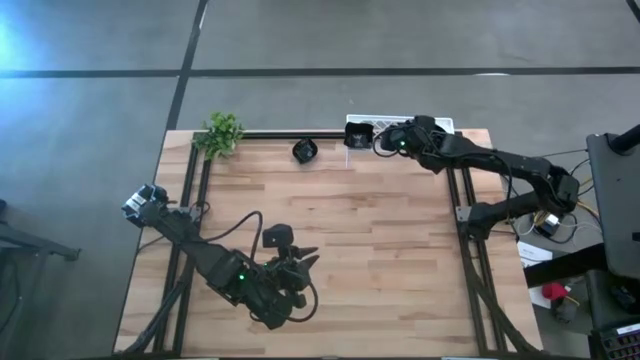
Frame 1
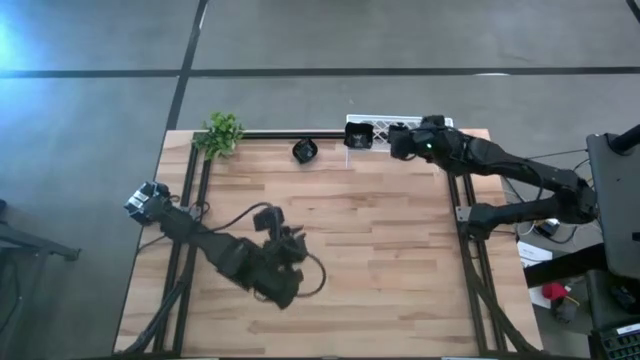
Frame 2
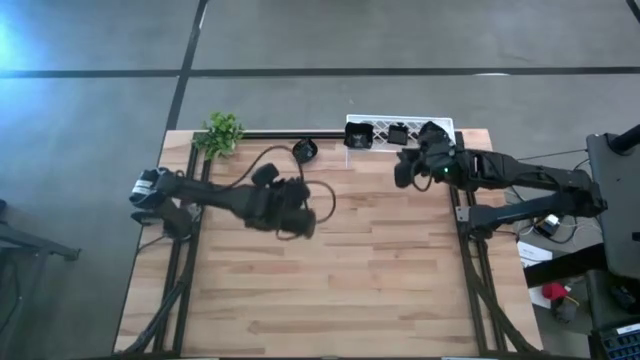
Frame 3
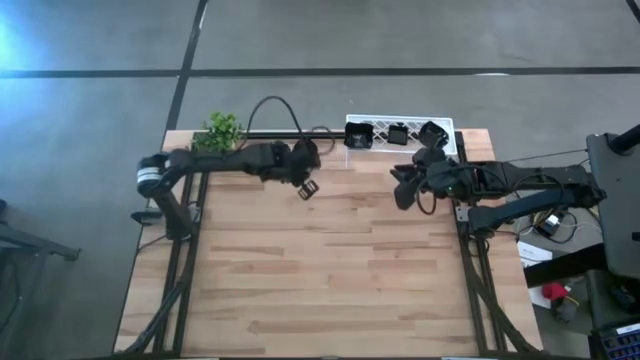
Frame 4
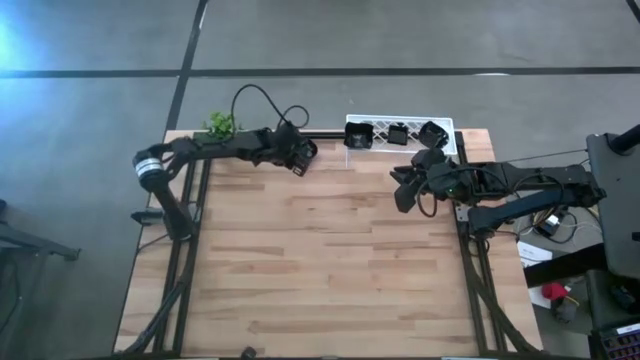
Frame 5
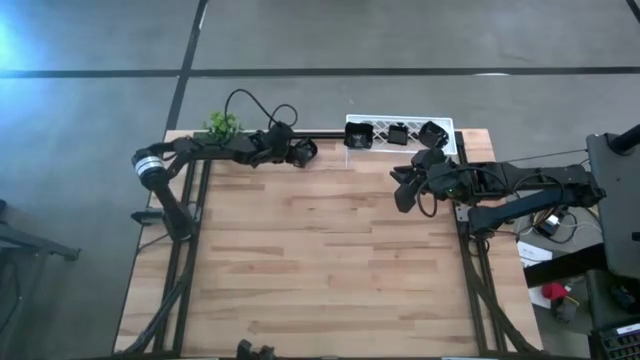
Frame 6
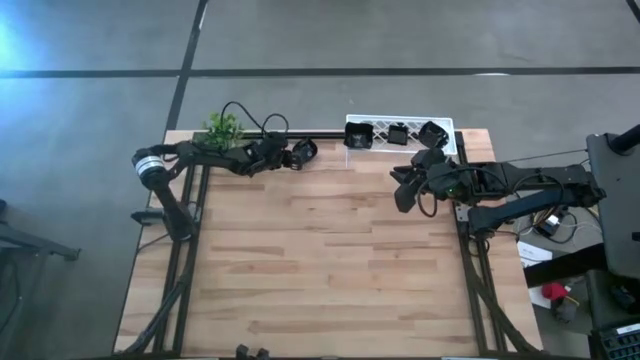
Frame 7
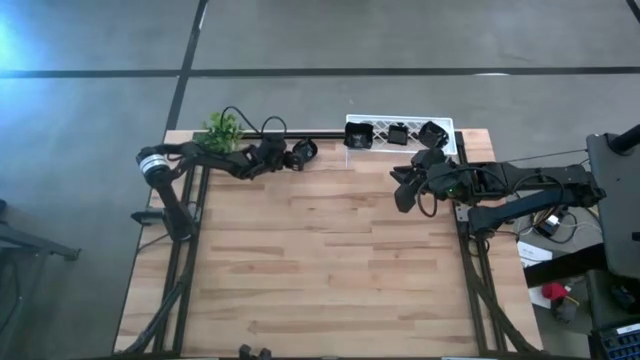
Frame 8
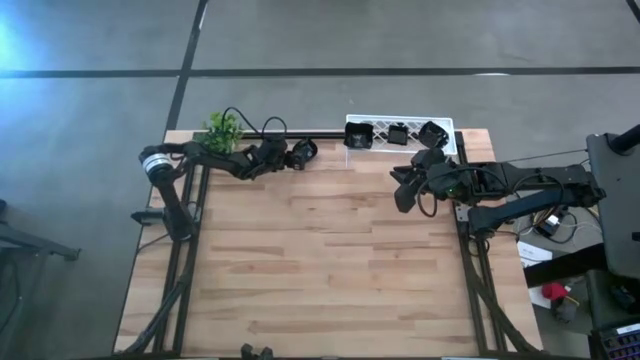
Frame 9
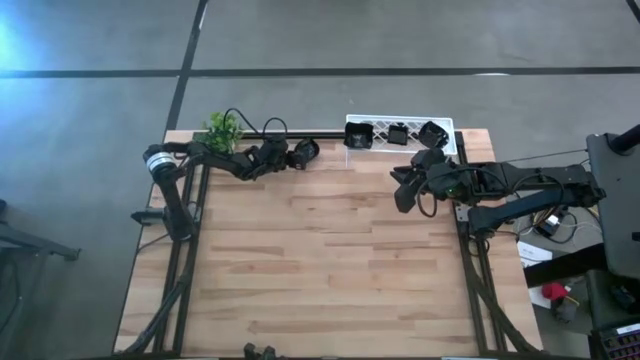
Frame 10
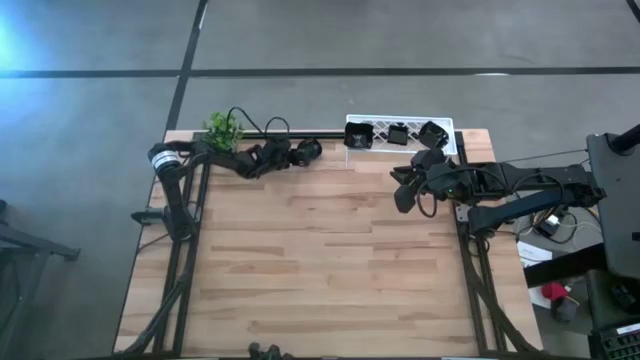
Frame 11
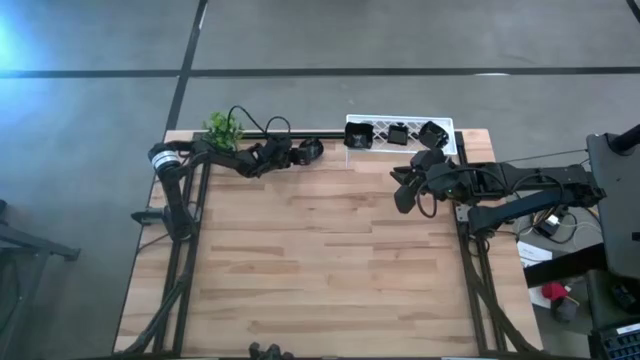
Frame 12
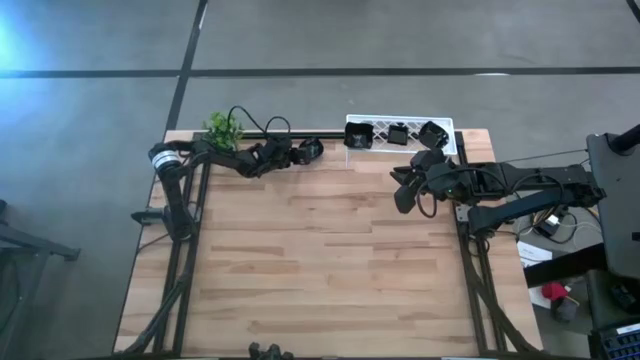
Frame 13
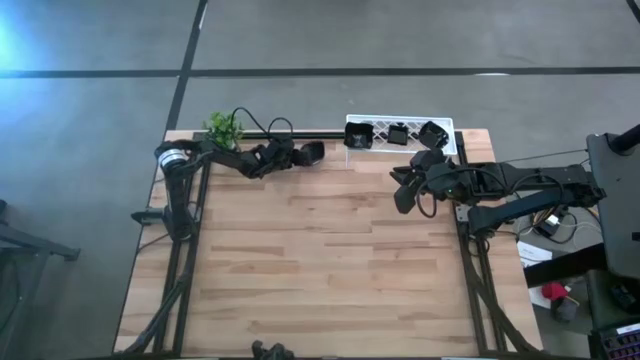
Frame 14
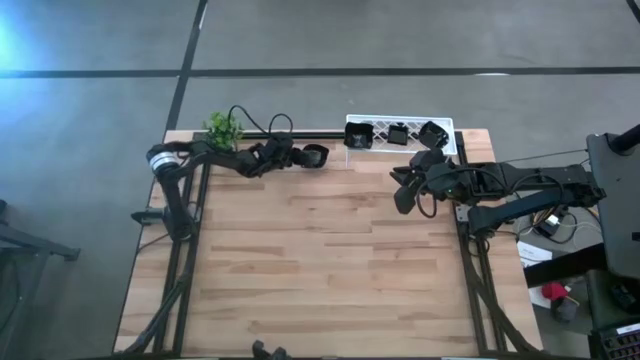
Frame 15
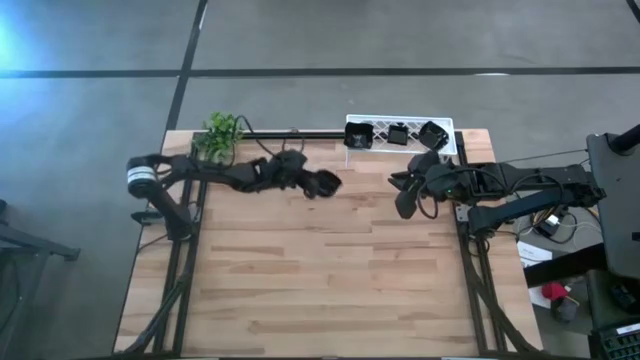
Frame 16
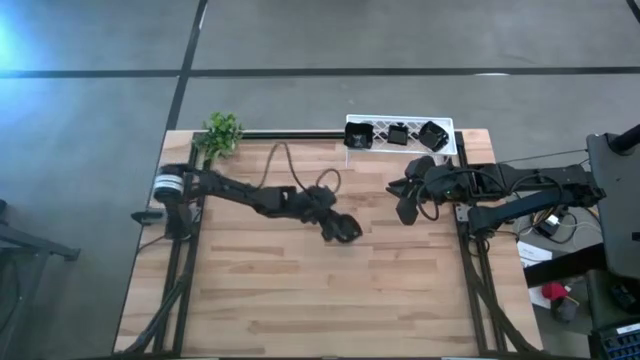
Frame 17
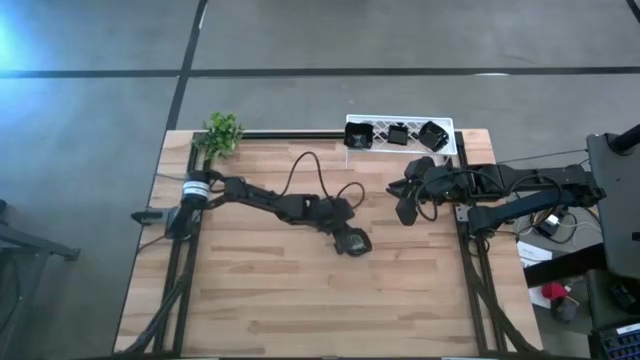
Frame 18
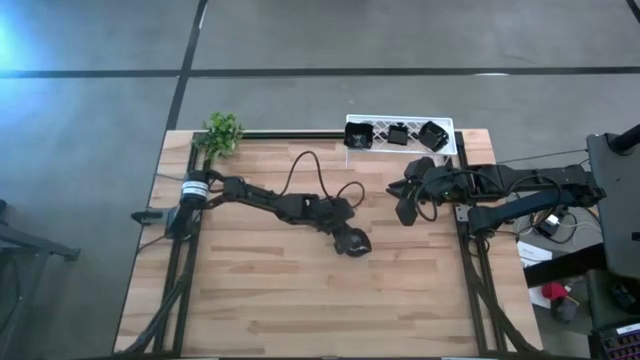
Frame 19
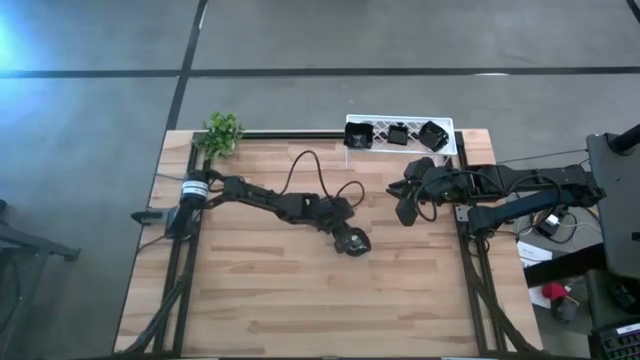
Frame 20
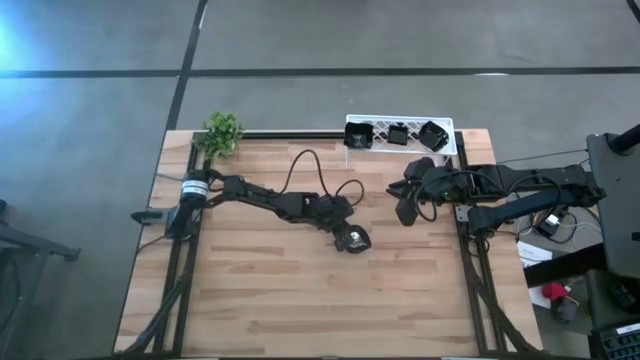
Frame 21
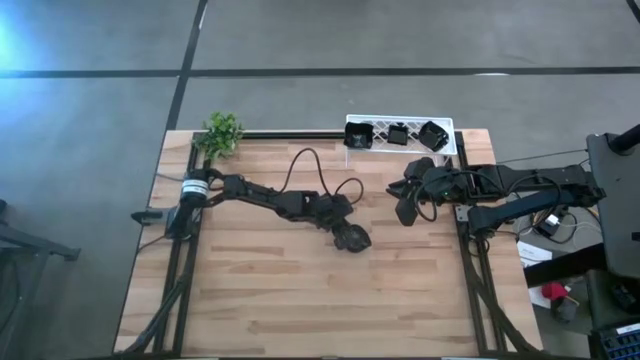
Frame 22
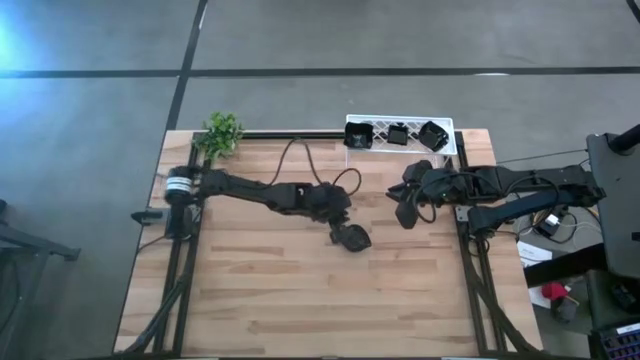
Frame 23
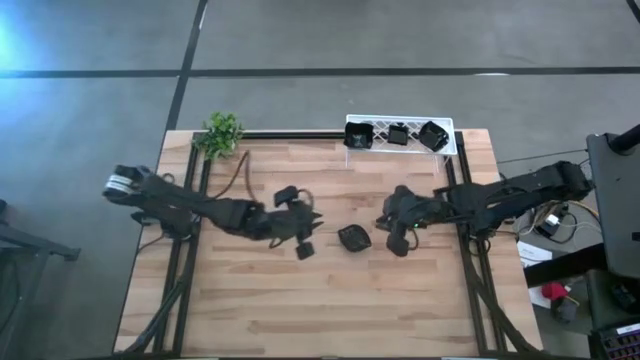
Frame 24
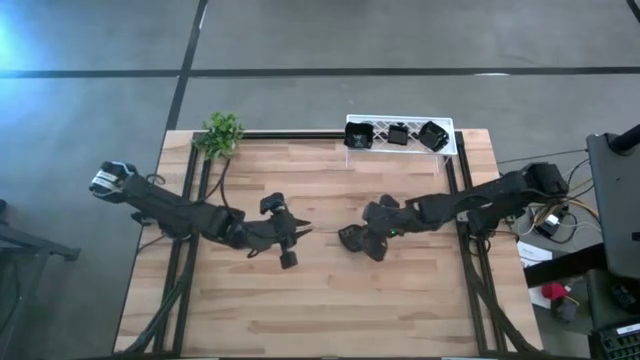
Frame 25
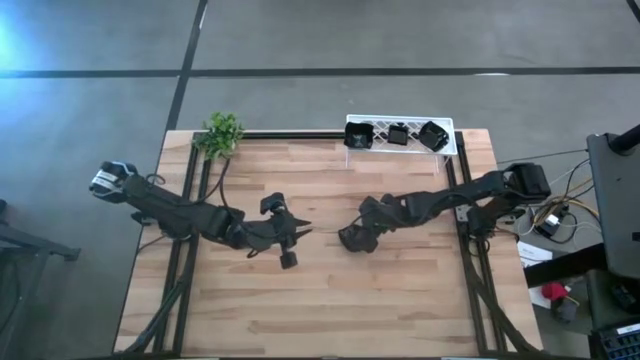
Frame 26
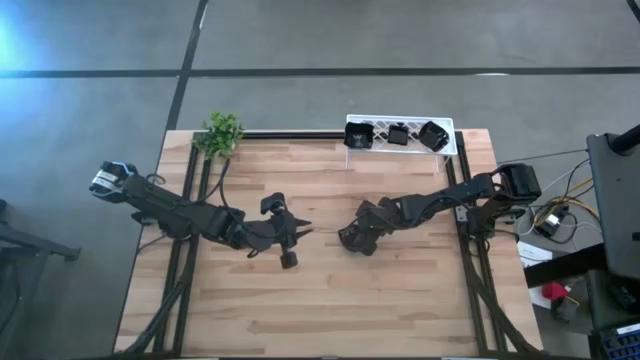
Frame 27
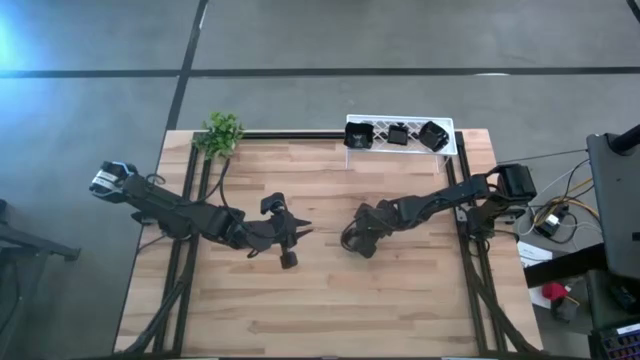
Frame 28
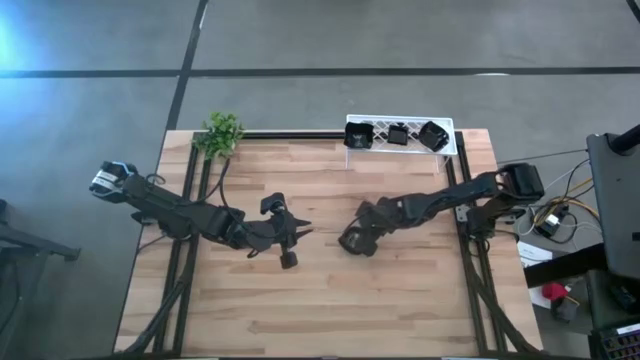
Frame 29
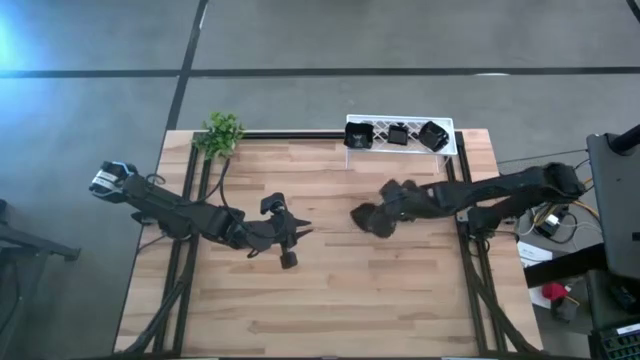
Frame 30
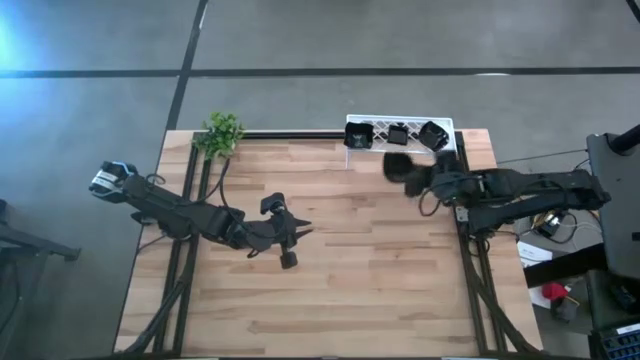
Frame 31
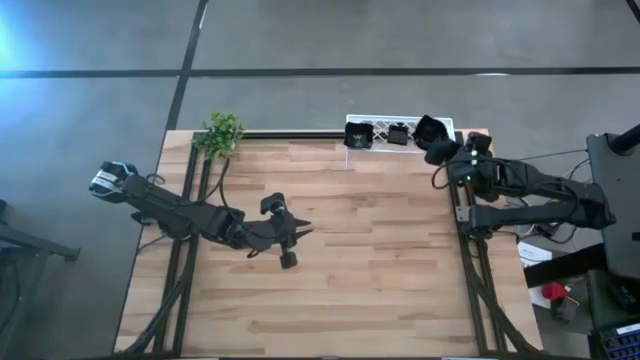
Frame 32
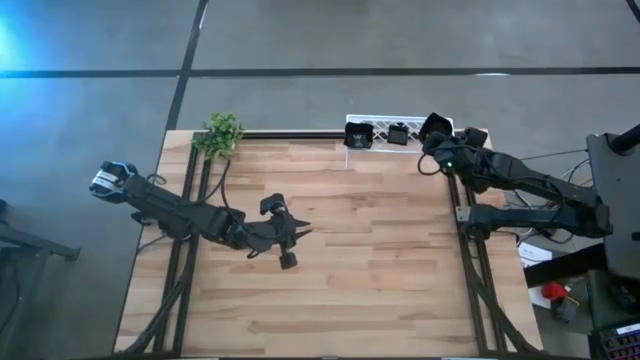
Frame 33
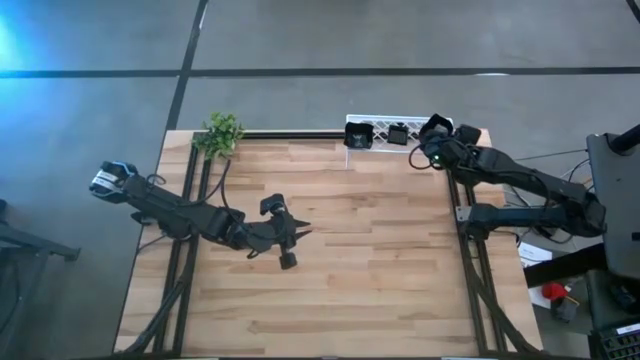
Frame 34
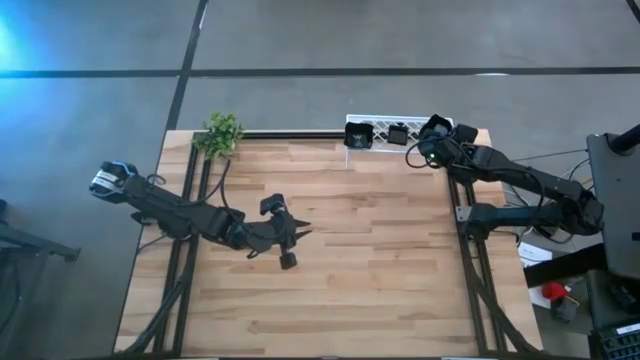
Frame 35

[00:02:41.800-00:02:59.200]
Task: Pick & Place Mini shaped plates
Stack the black leaf-shaped plate on top of the black leaf-shaped plate on the shelf

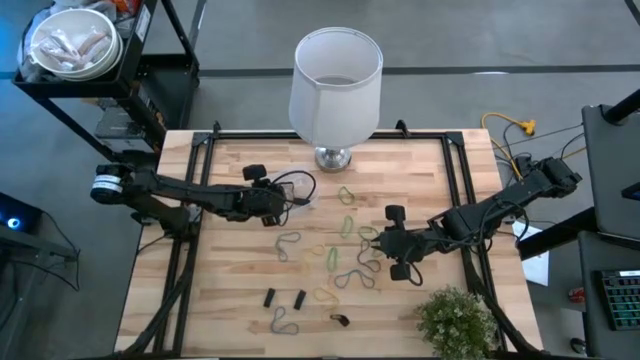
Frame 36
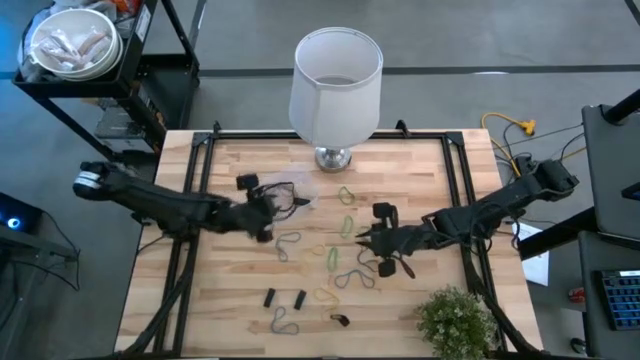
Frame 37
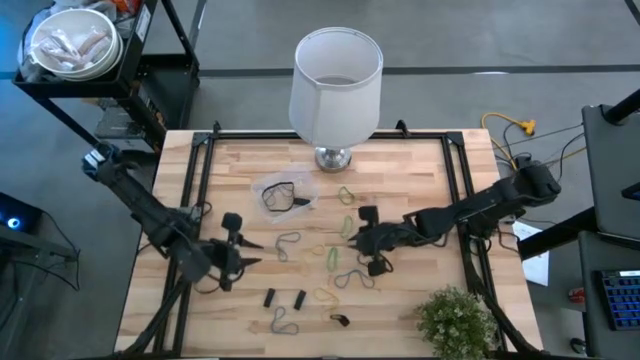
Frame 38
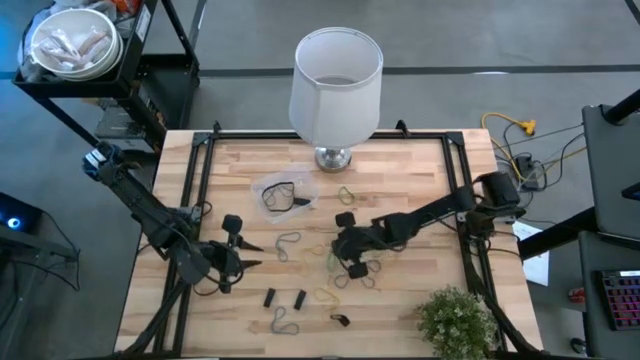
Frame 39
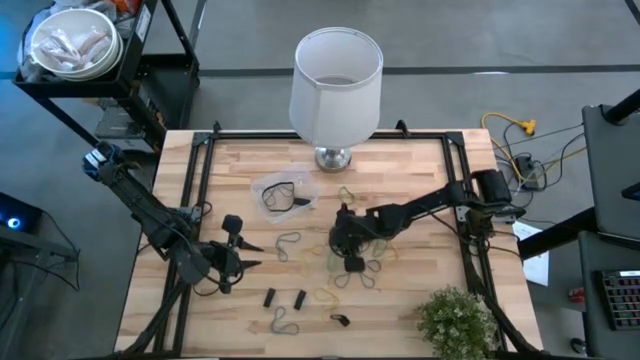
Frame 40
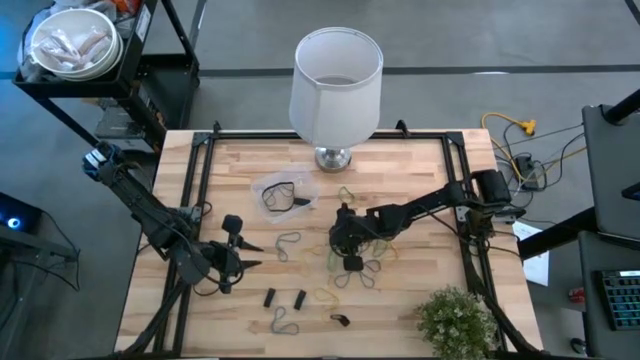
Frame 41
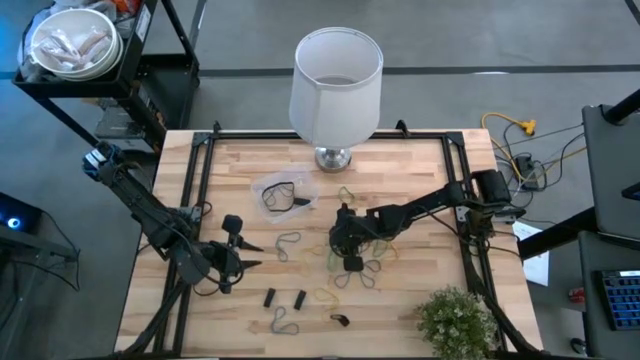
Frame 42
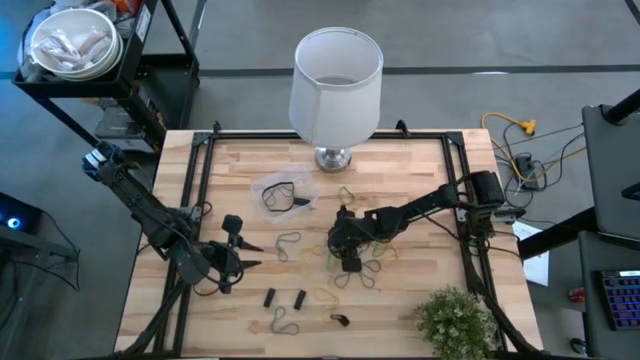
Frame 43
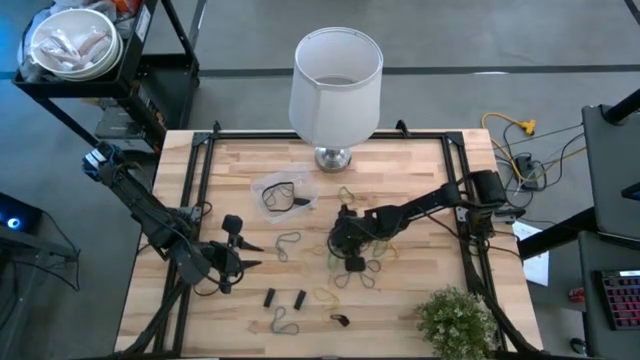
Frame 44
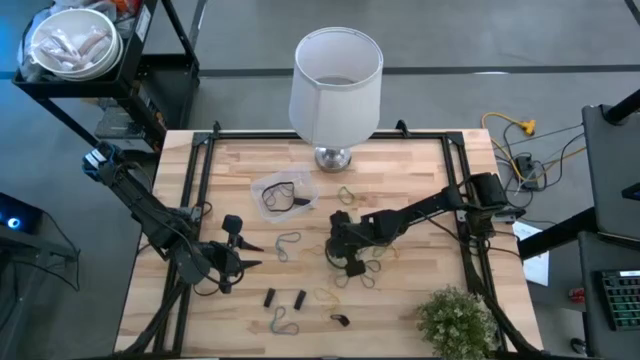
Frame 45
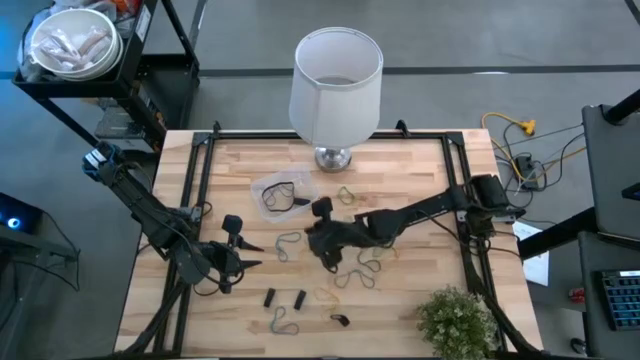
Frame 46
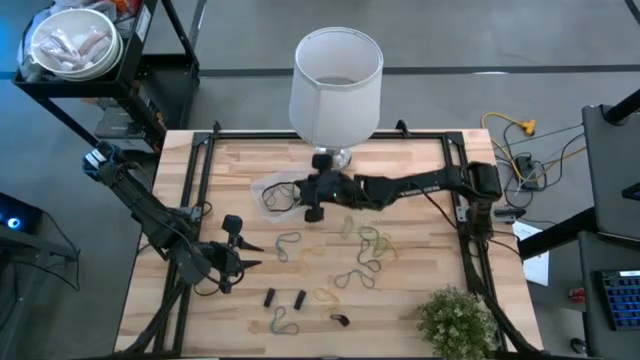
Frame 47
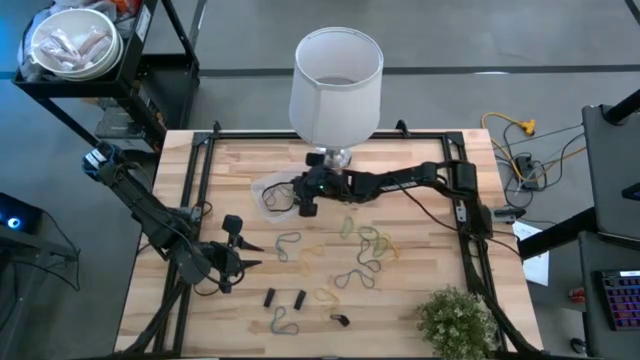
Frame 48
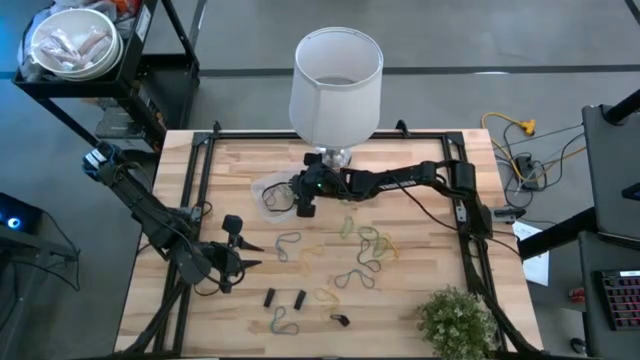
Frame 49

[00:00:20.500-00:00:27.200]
Task: Pick and place rubber bands into bin
Put the green rubber band into the transparent bin
